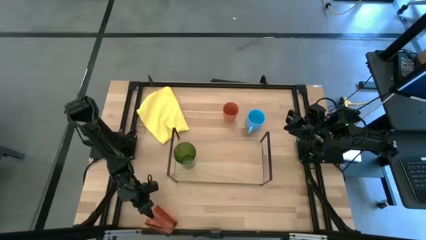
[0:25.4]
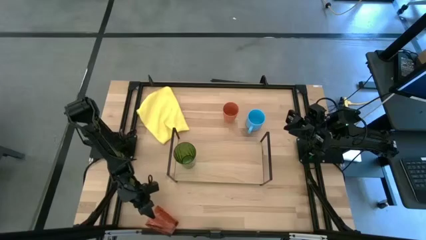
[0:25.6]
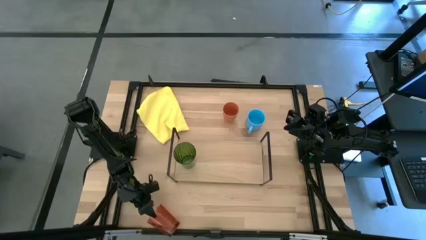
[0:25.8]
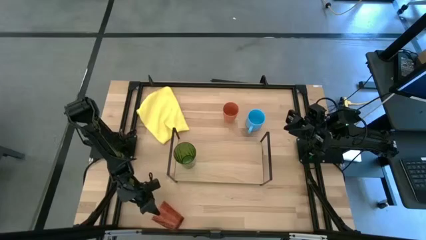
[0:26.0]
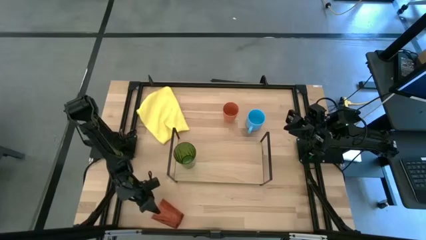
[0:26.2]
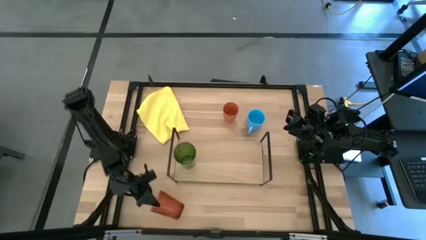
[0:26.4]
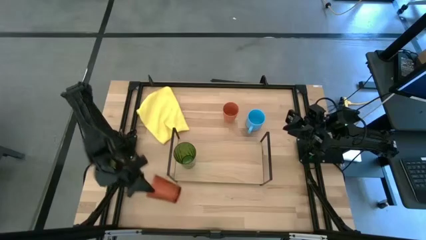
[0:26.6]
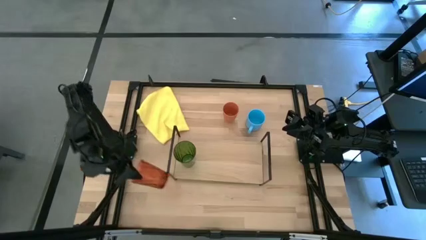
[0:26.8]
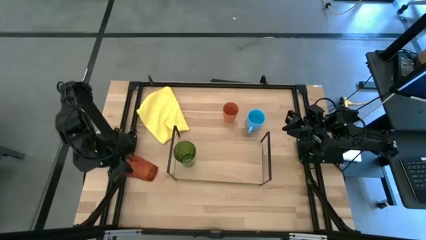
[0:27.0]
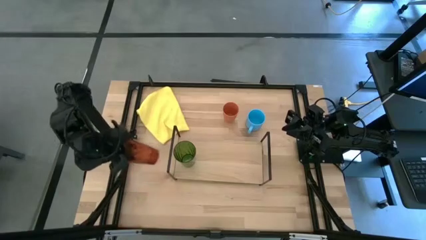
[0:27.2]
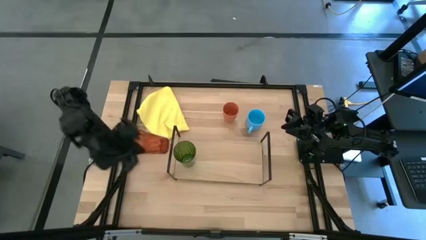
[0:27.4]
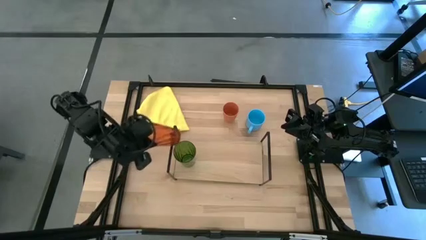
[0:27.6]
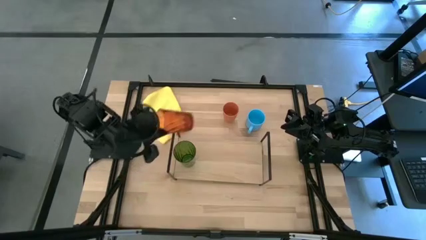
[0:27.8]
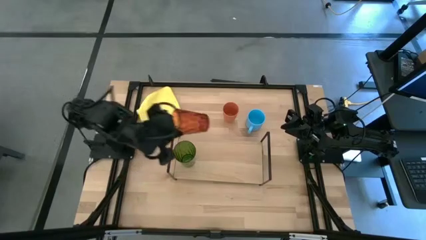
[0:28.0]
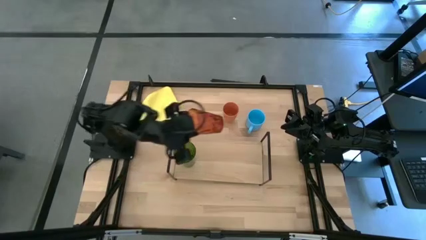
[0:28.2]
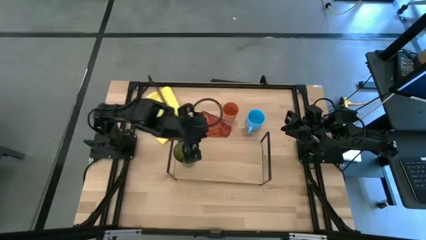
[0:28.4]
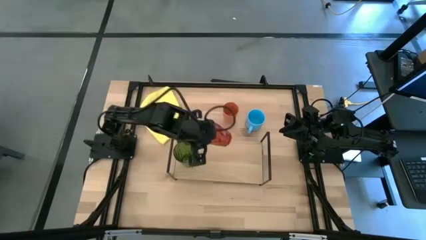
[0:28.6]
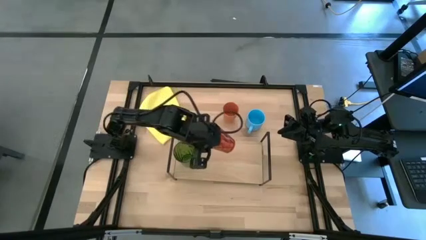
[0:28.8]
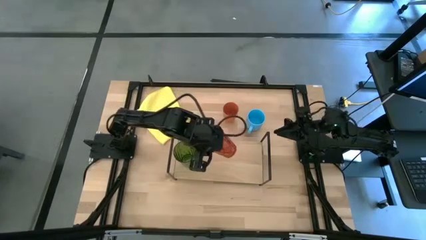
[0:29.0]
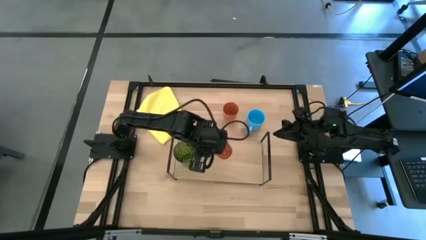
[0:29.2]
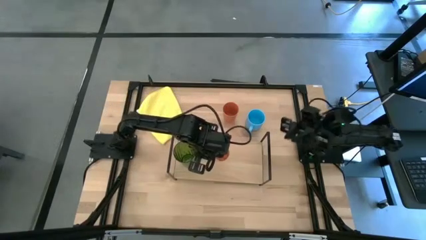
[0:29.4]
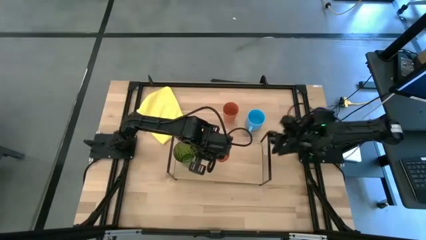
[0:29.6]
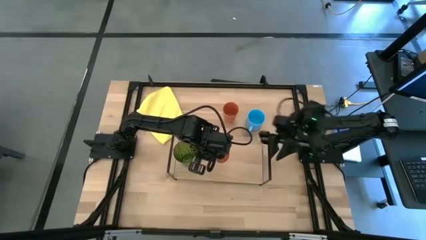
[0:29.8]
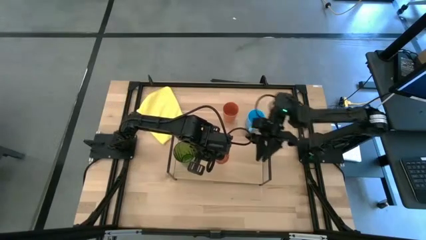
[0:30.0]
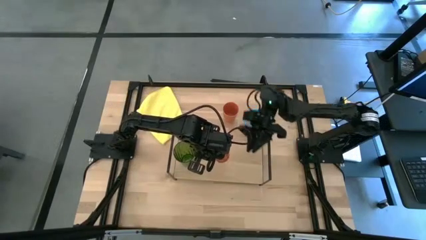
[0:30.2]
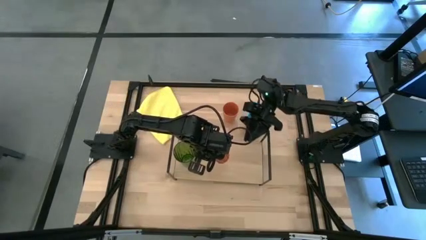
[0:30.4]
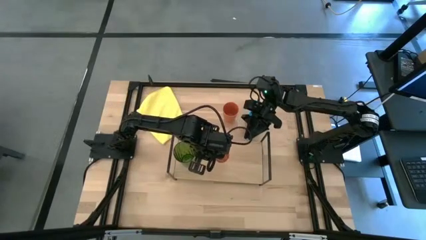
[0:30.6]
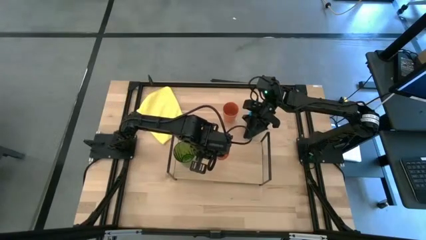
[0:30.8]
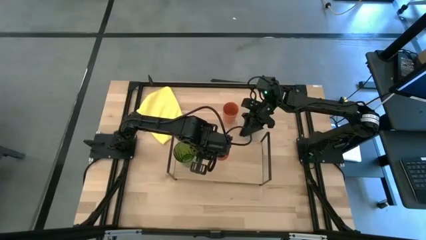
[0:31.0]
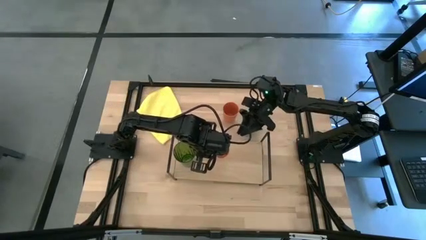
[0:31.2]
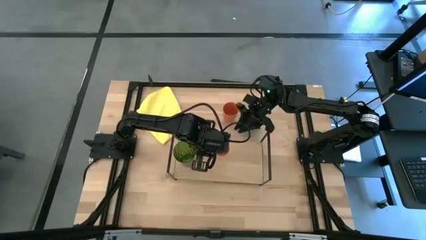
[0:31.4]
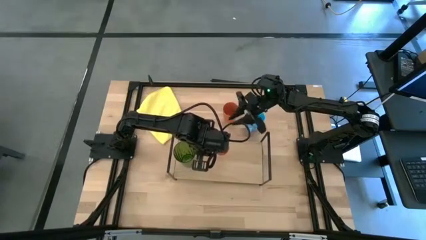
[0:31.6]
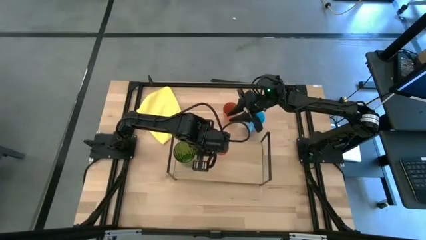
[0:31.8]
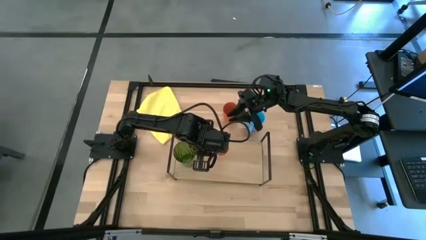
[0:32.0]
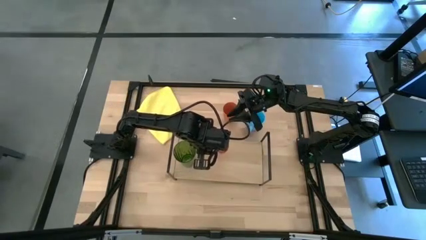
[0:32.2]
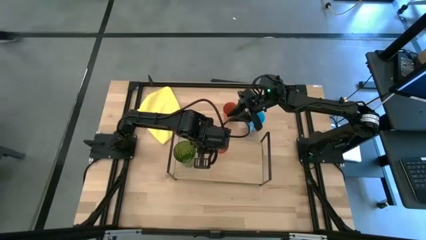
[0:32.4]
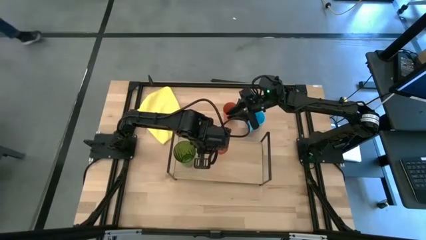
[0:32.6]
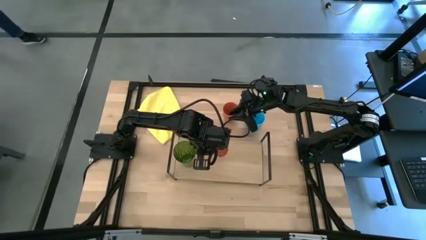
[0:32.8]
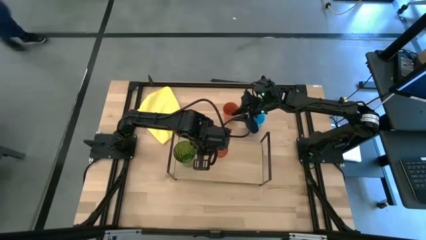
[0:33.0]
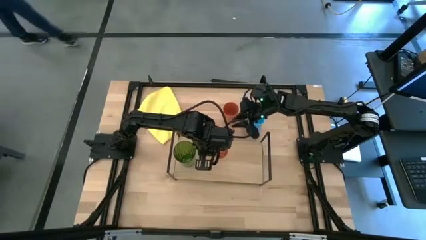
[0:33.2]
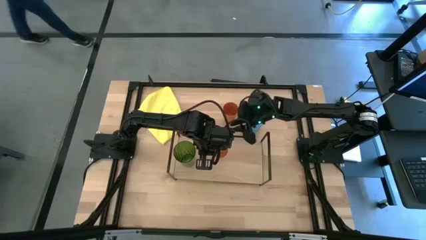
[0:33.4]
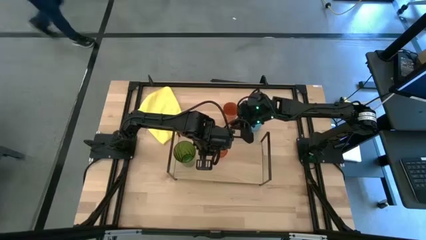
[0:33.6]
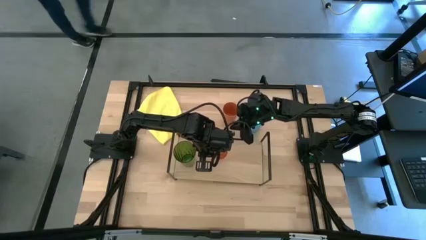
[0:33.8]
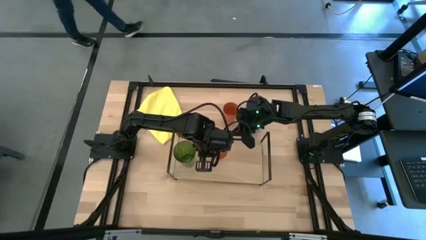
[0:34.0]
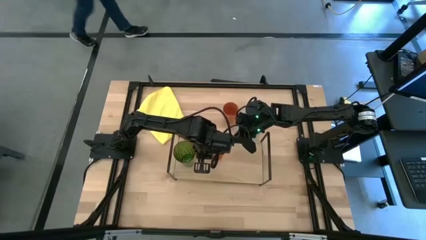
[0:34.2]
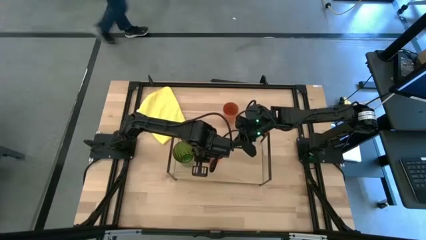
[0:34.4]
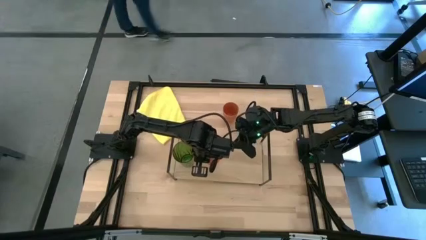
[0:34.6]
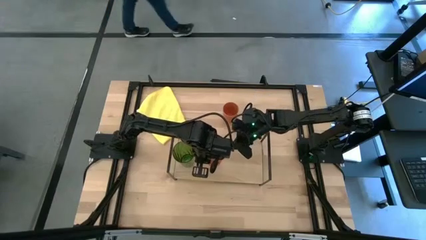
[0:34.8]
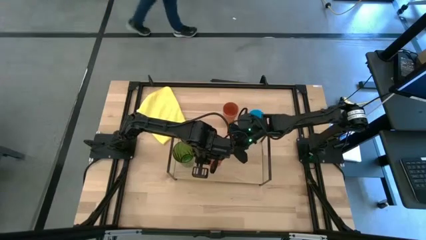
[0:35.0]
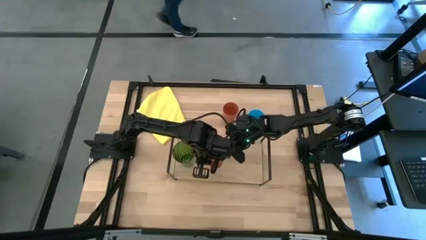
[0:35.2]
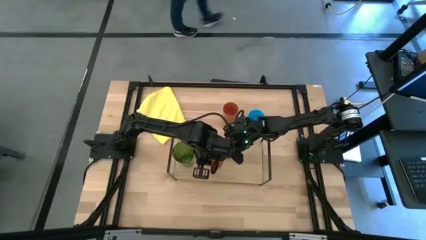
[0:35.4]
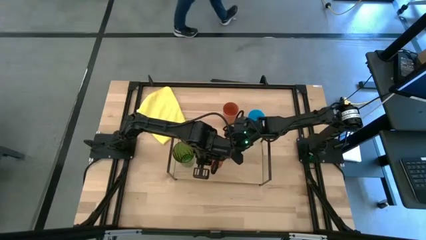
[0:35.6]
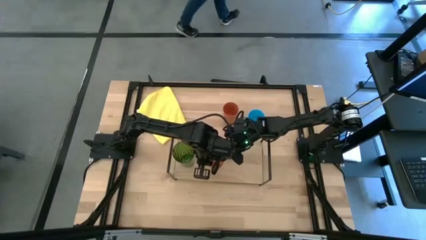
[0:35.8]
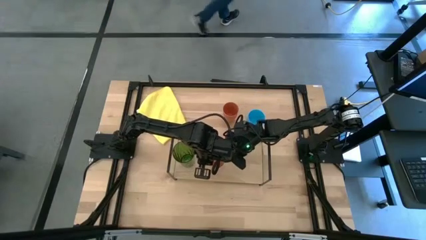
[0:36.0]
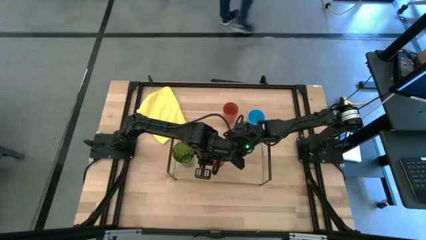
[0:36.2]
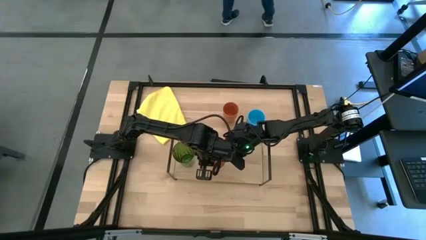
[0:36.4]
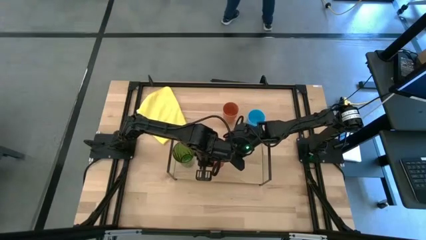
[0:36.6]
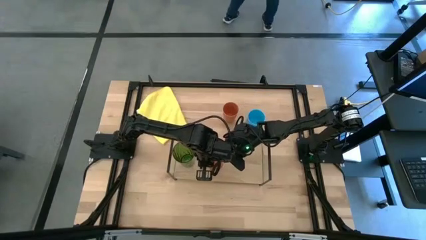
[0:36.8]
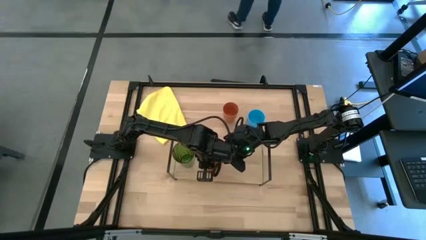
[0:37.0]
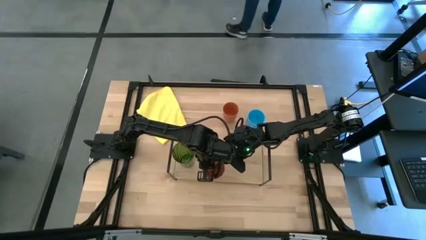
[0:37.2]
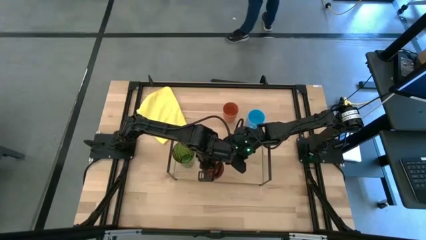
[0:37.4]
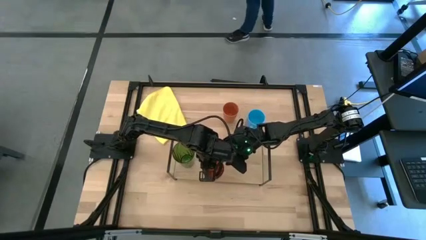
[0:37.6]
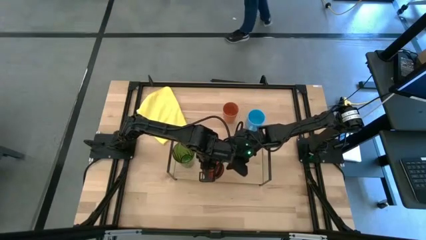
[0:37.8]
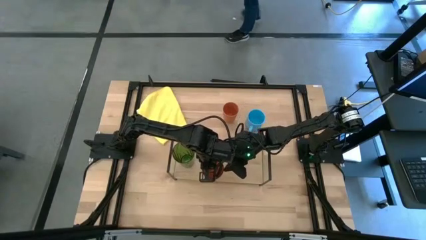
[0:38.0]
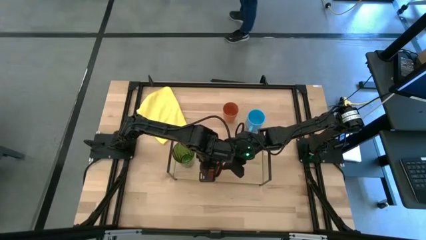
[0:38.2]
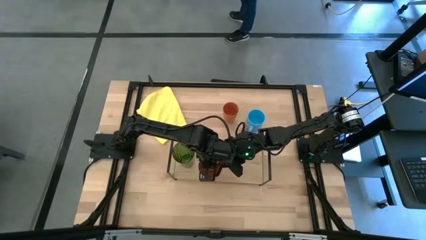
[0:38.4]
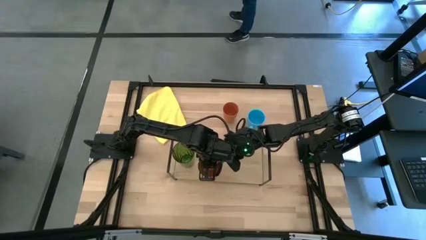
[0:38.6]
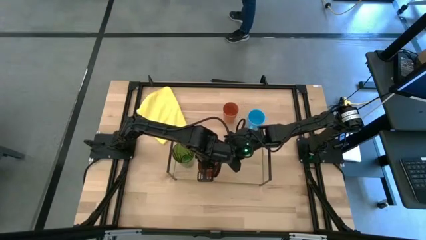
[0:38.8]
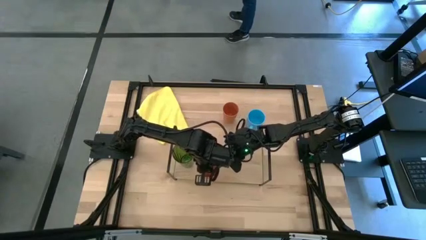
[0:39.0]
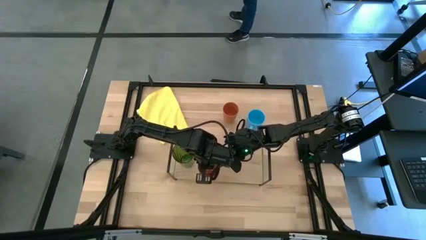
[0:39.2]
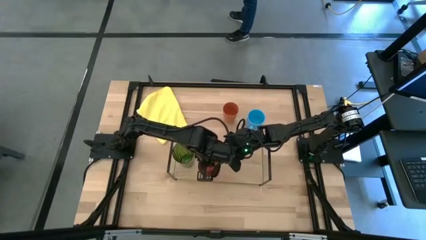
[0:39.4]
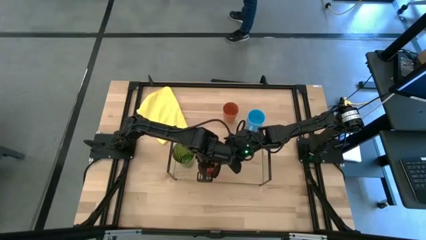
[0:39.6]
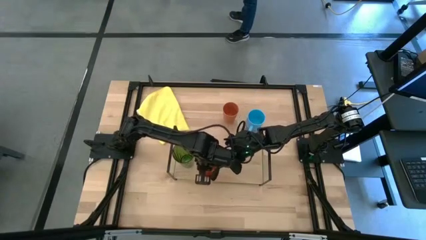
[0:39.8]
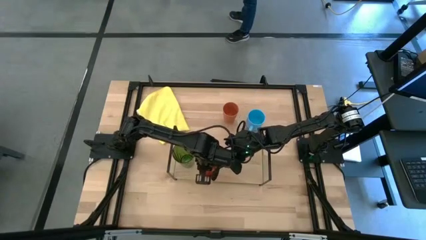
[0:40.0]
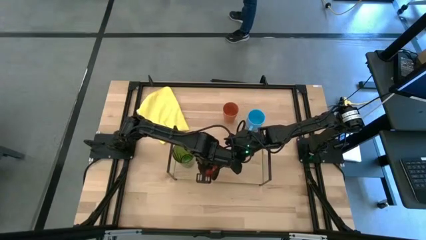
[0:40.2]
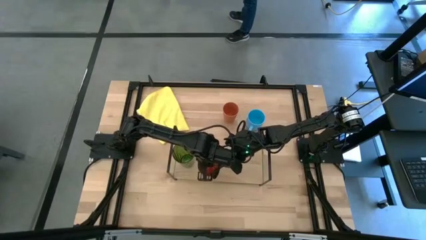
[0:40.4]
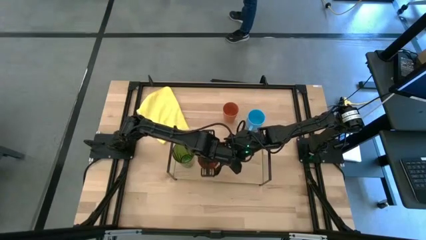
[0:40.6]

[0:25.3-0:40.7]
Task: Stack small to large cups/mugs on shelf
Put the red cup on the shelf
